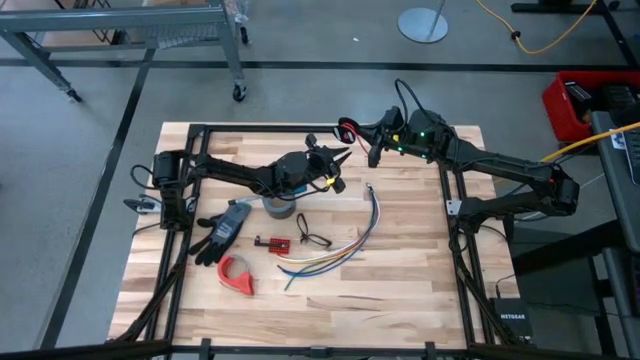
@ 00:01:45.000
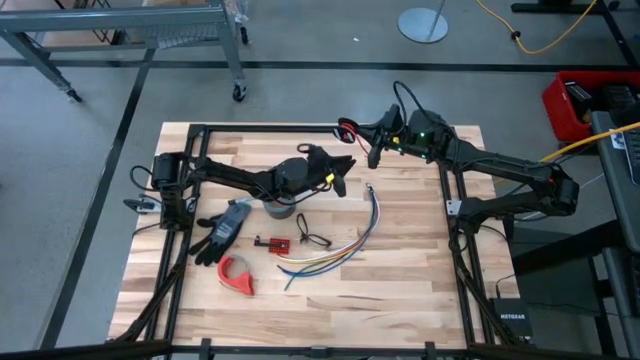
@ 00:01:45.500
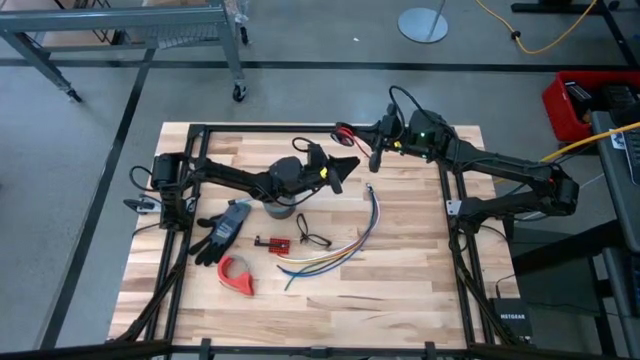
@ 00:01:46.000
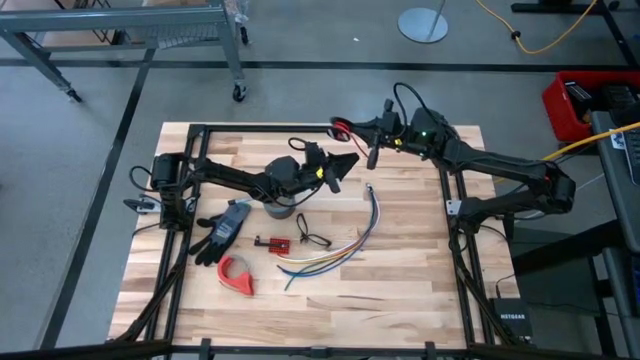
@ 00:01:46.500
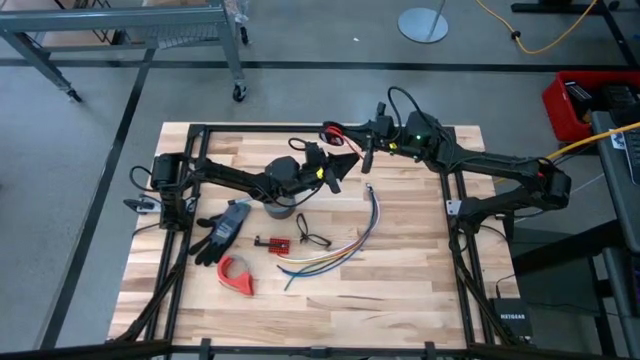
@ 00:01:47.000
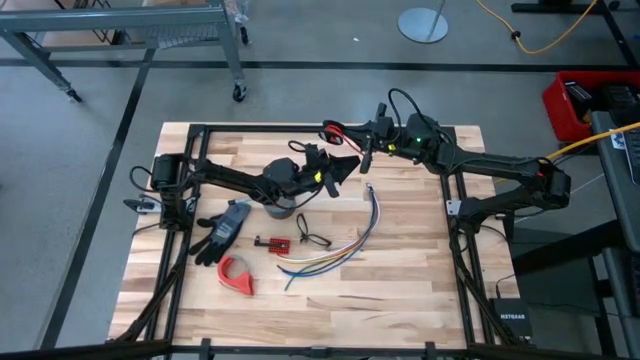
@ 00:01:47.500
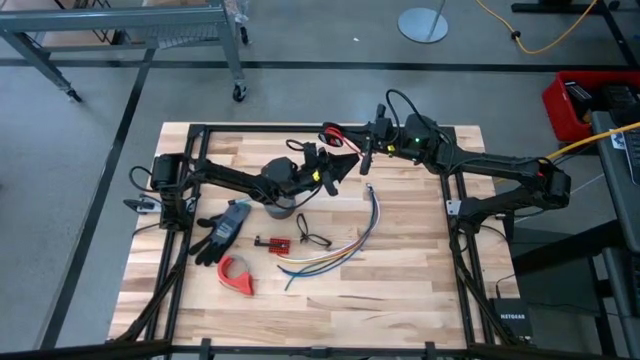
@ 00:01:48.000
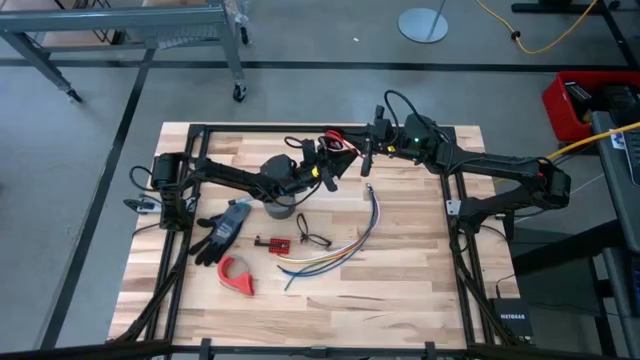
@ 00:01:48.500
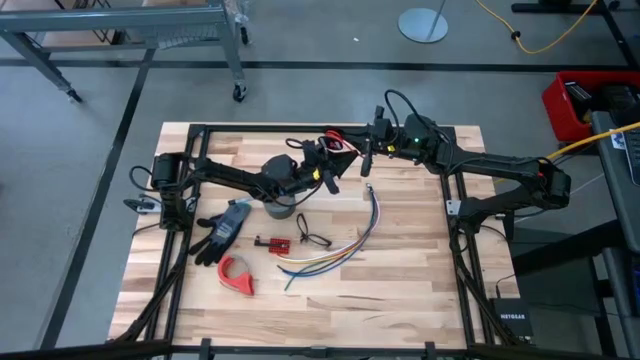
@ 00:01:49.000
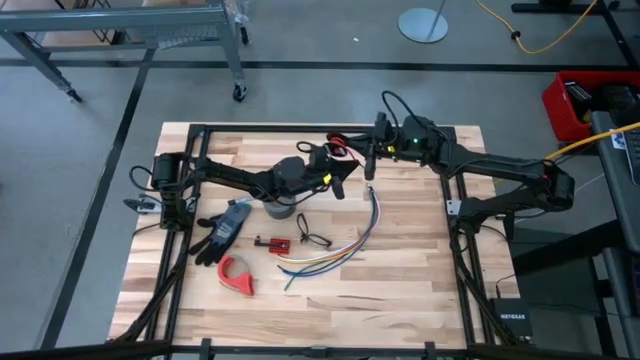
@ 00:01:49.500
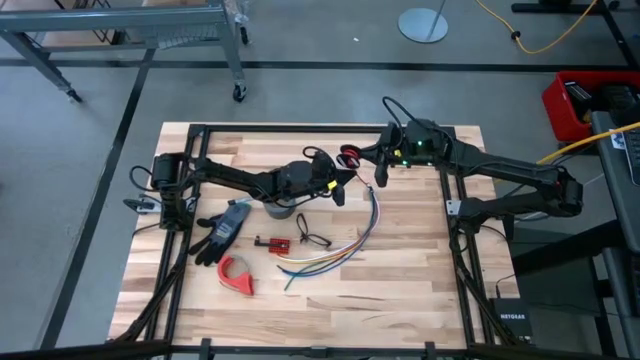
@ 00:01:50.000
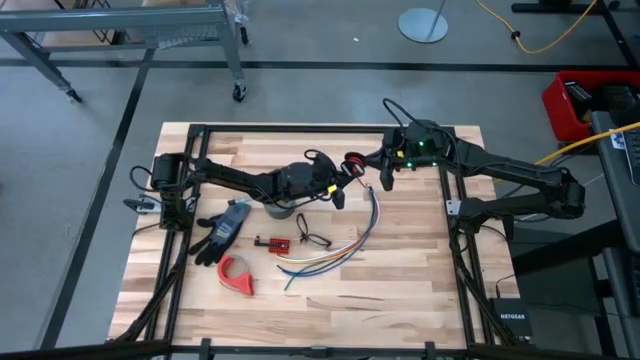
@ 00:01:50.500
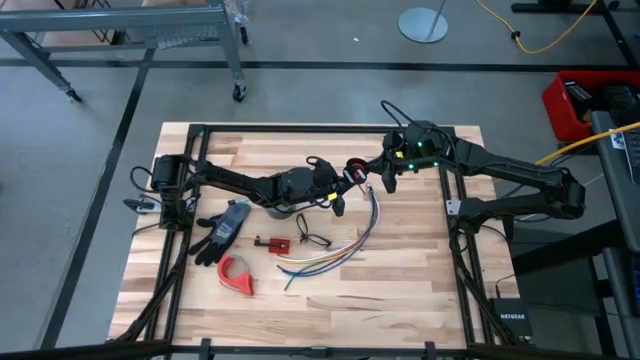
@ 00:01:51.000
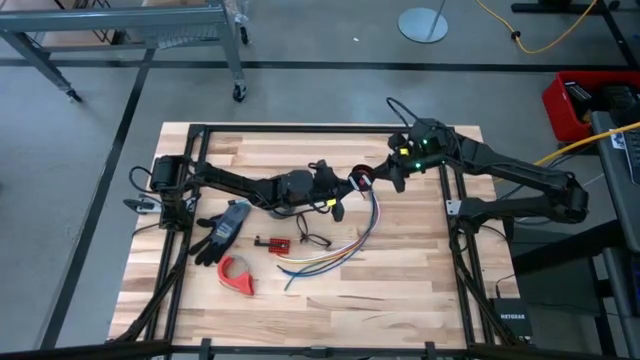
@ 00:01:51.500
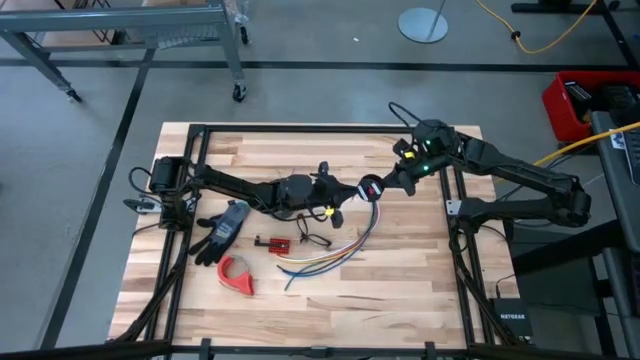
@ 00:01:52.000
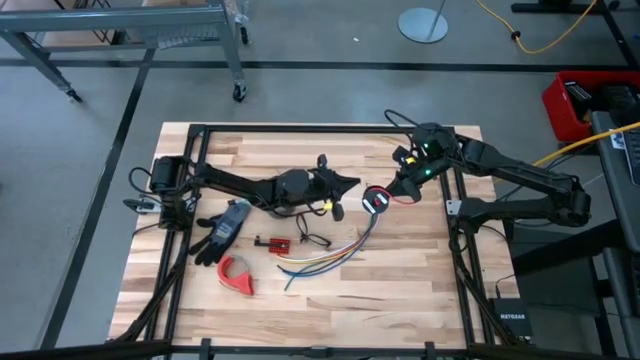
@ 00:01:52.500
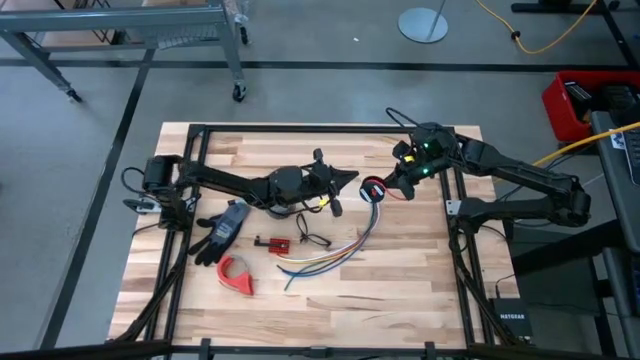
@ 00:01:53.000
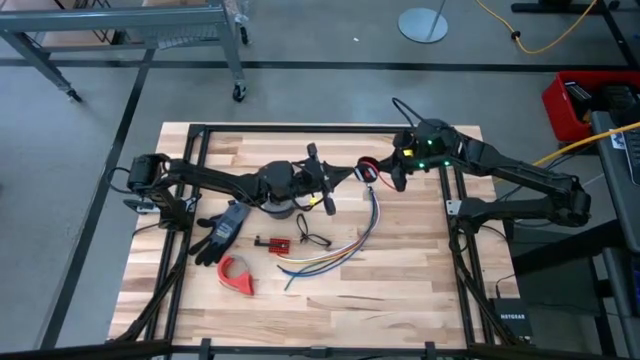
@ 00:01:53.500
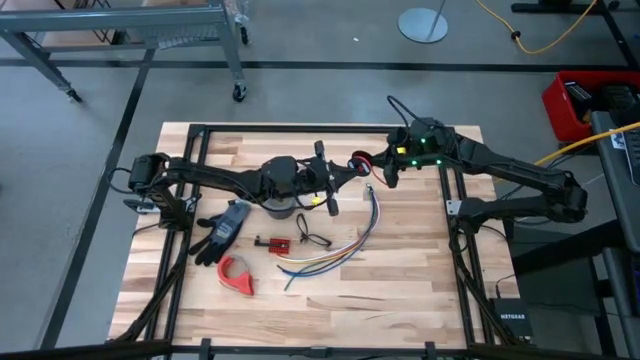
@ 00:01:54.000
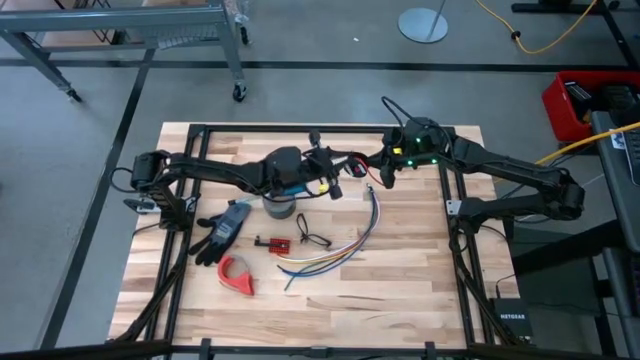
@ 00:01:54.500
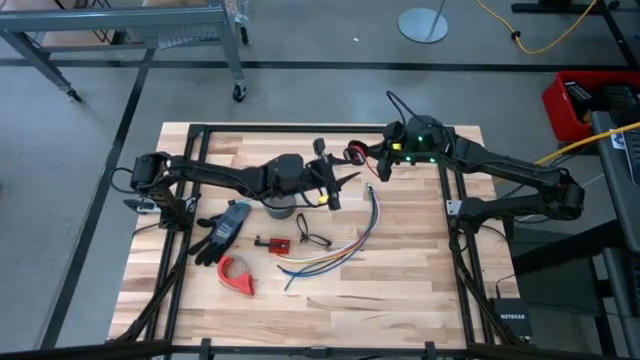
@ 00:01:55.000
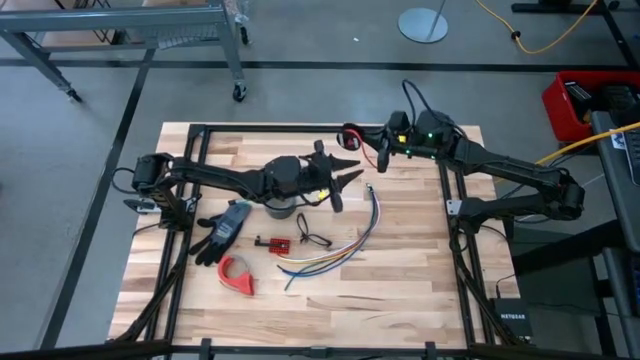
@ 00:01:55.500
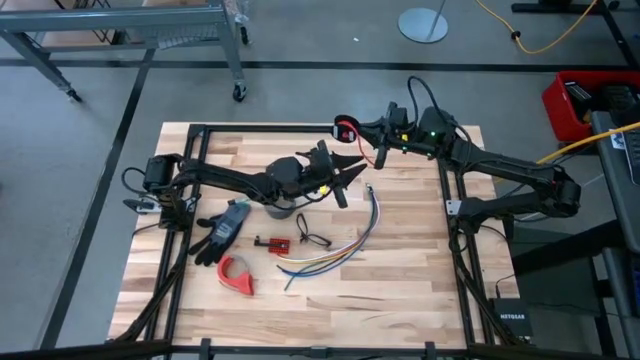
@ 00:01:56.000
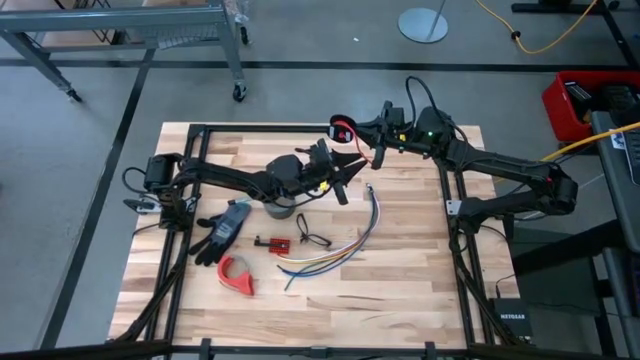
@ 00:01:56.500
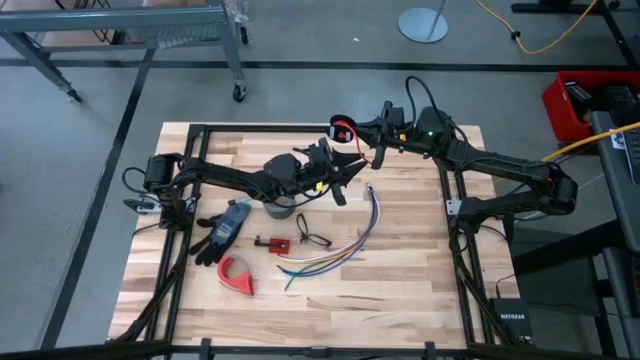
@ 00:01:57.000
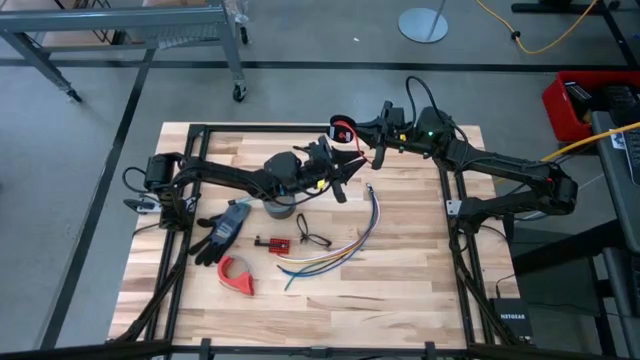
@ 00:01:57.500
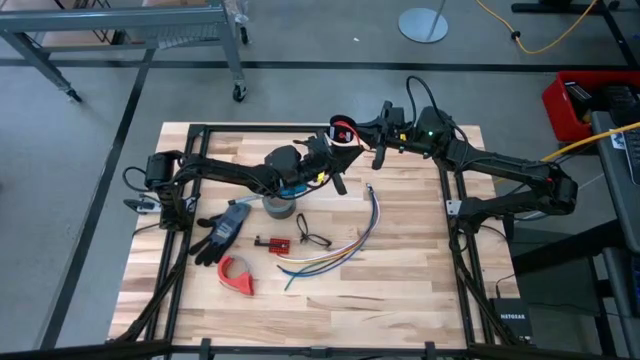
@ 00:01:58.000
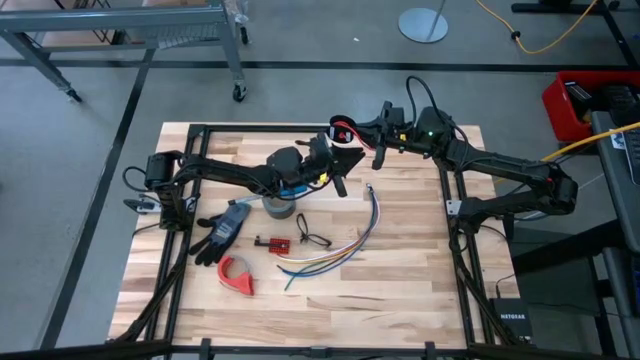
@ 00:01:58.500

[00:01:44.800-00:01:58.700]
Task: Coil cords
Coil the red wire on the spool

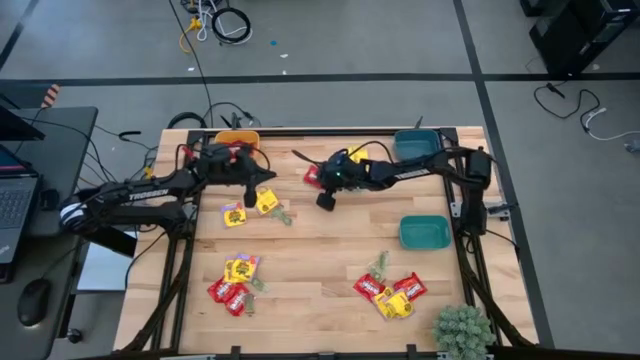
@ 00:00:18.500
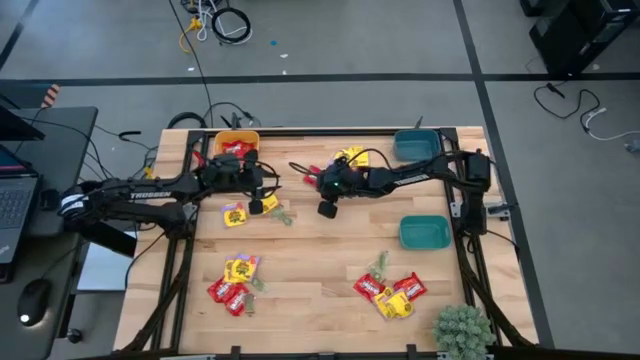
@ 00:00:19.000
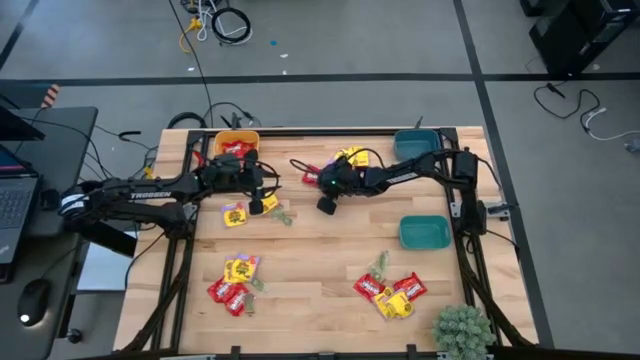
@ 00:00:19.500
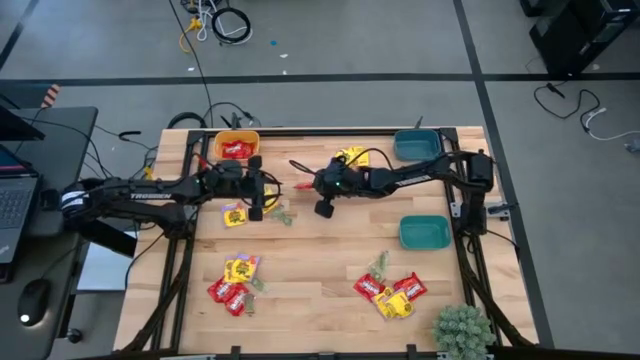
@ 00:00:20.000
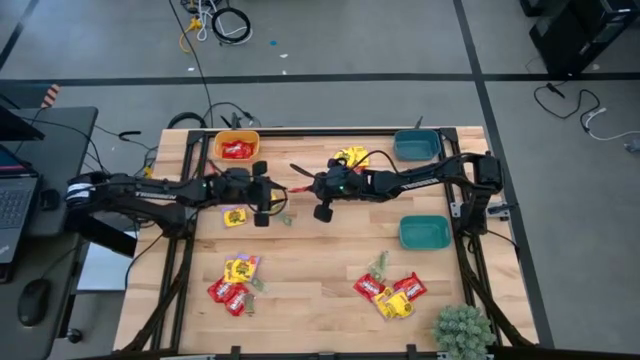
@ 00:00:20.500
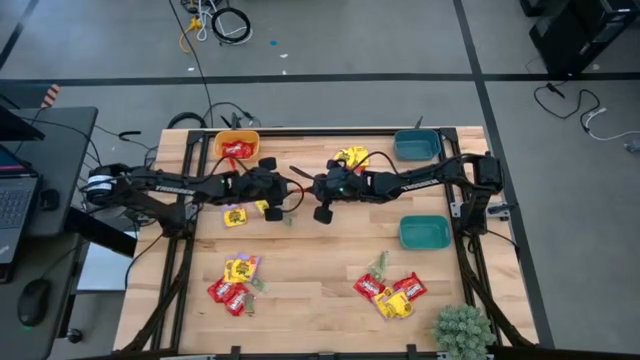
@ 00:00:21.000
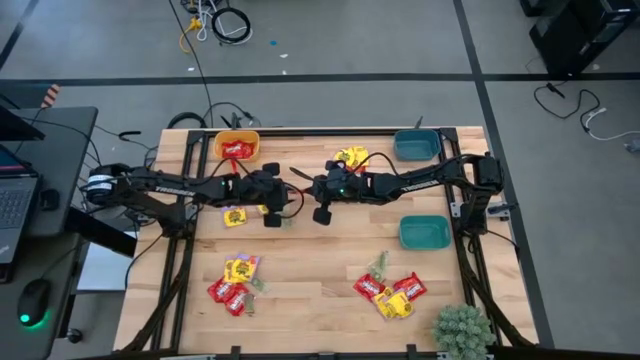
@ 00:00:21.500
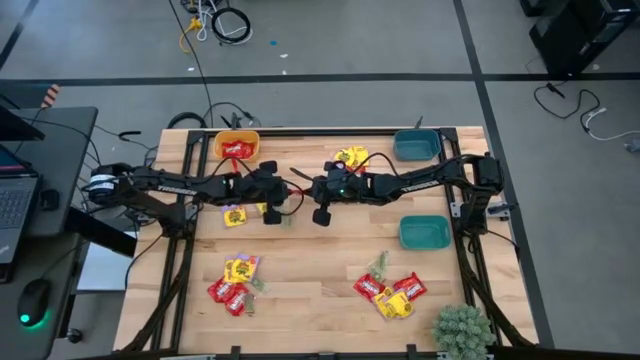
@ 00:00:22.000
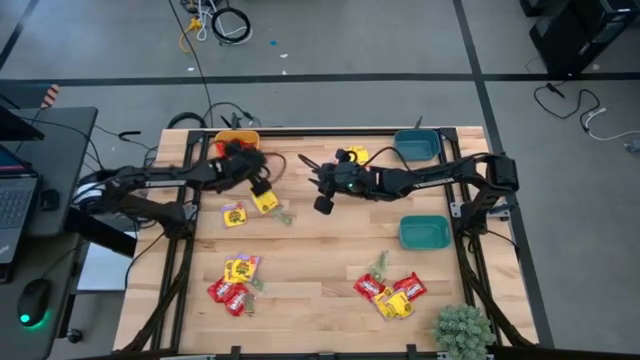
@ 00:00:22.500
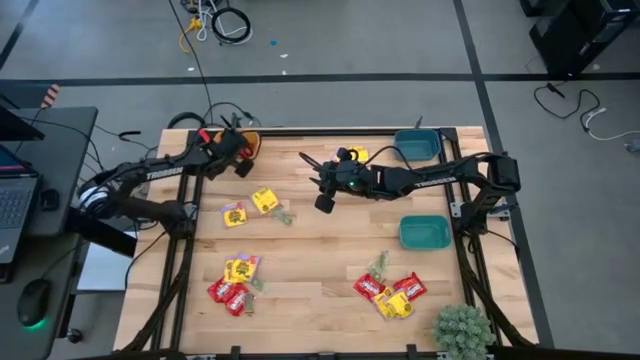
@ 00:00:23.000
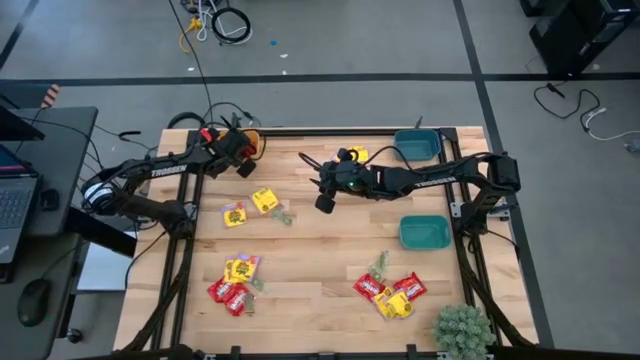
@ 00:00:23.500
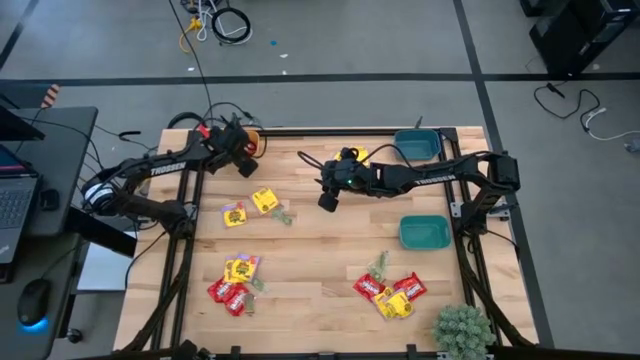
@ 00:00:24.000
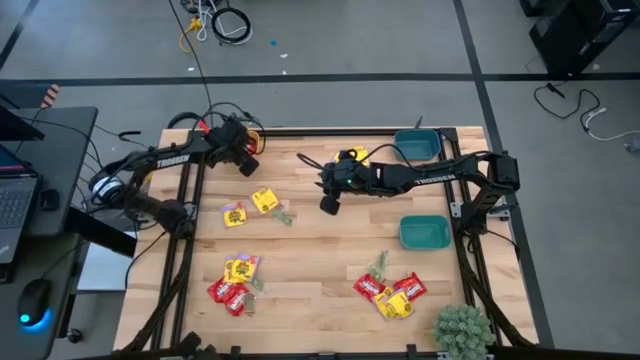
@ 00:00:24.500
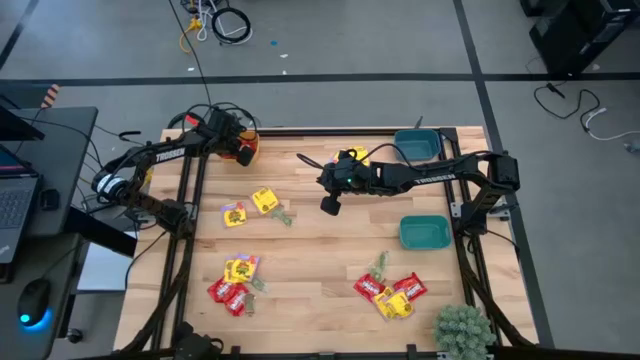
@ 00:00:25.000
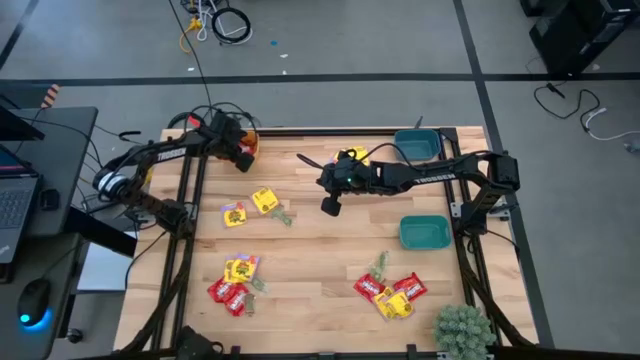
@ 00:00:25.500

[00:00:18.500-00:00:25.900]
Task: Sort candy
Put the red candy into the yellow bin
